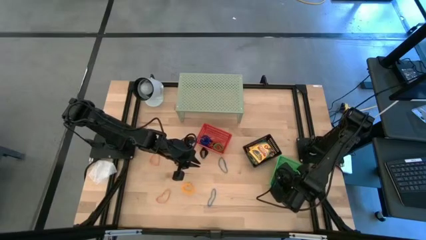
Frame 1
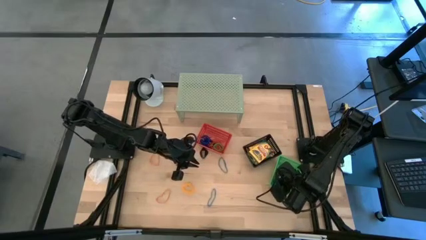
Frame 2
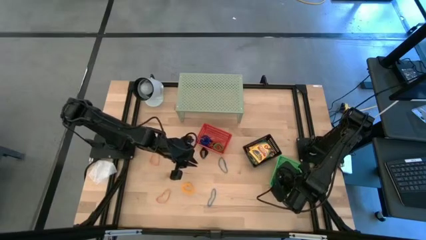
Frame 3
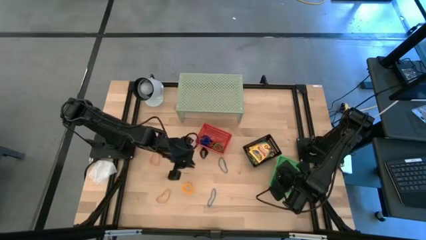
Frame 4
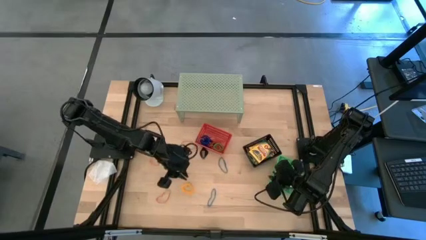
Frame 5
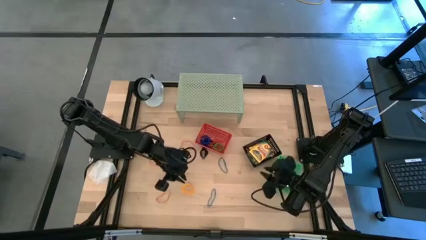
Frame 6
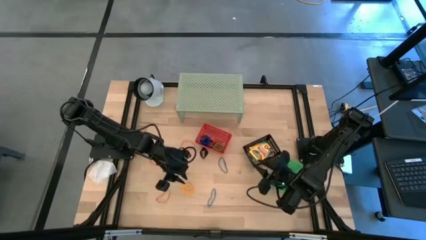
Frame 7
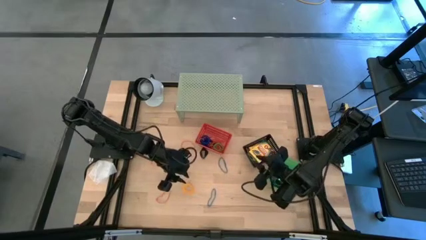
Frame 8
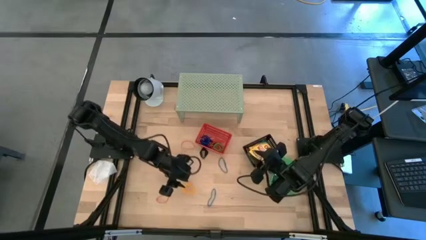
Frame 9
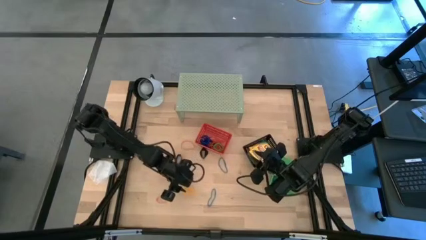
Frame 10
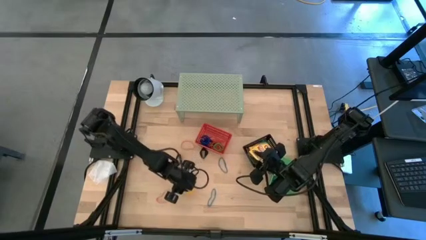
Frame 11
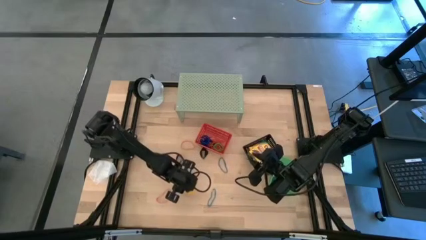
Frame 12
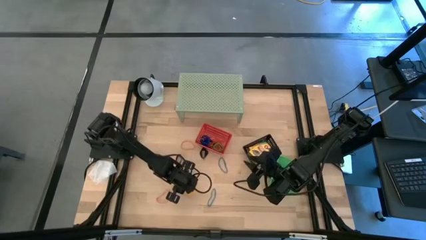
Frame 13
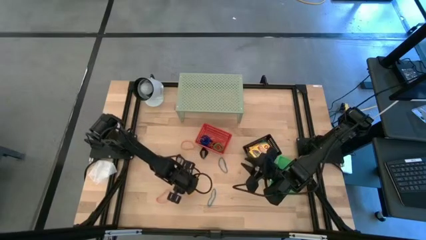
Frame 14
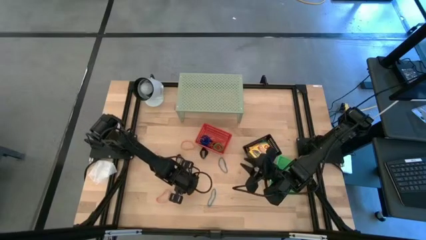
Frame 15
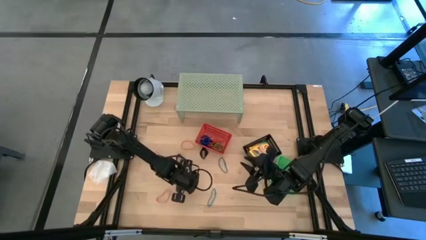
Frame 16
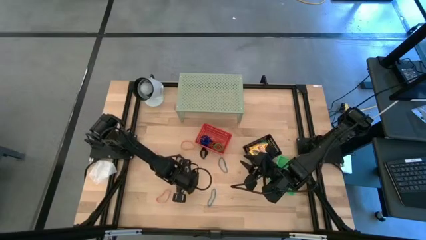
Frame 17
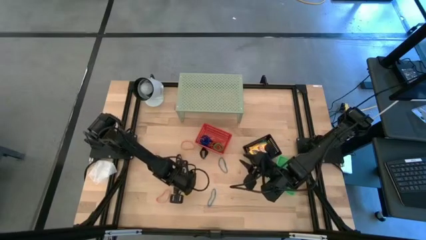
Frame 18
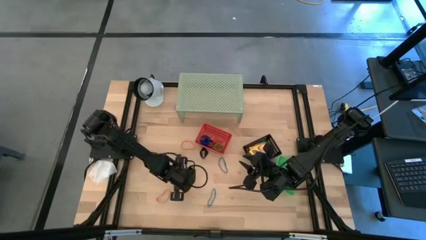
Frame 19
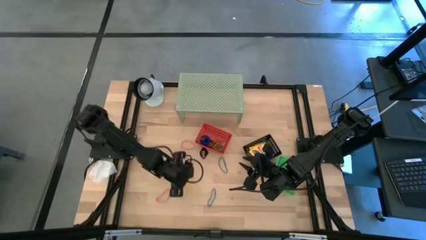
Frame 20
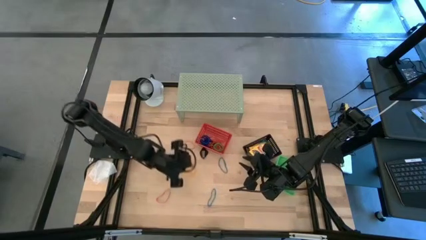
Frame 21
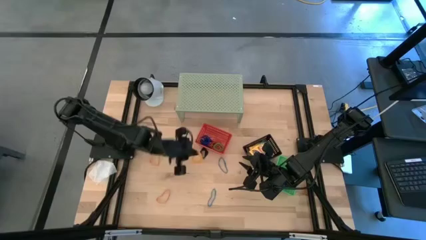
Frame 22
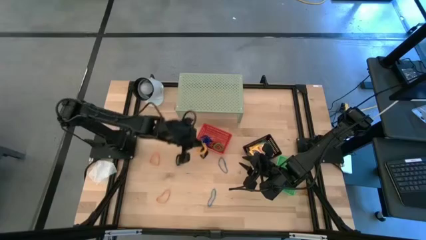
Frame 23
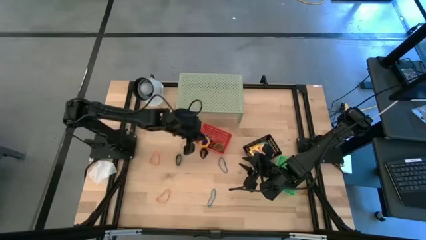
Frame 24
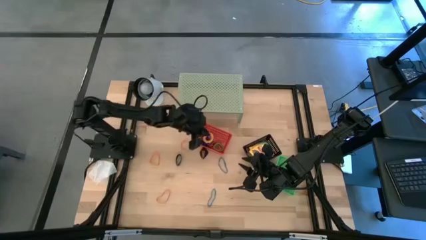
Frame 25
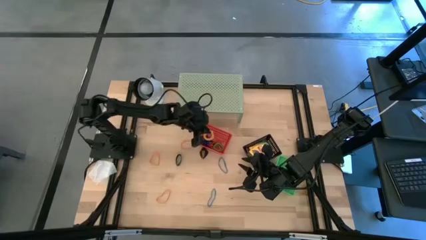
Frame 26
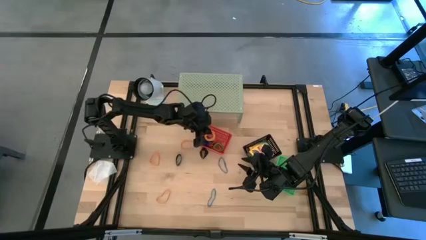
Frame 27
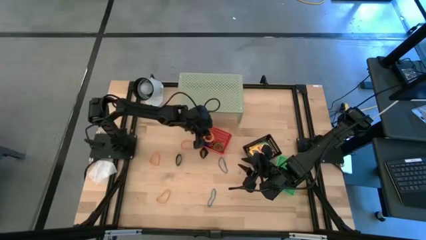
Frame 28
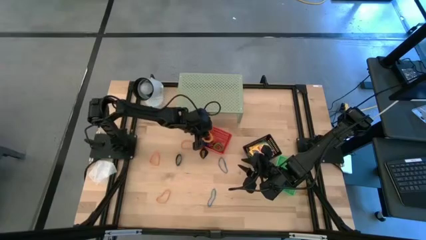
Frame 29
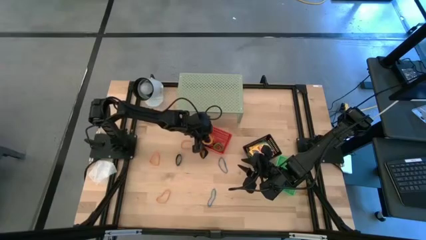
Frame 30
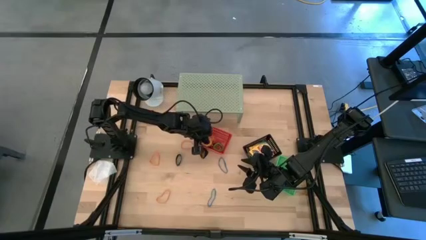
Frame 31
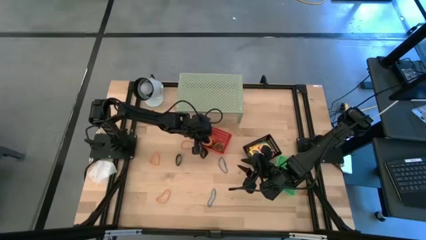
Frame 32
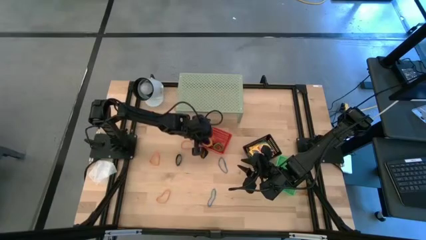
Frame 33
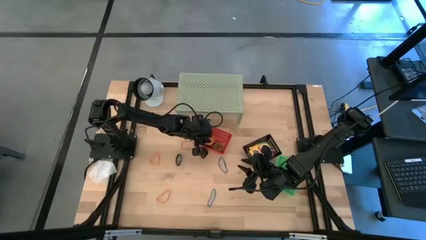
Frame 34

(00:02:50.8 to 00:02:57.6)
Task: Pick & Place Office Desk Supplies
Put the yellow spring keychain into the red bin

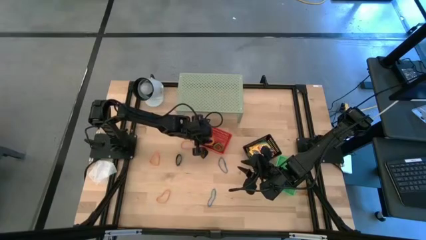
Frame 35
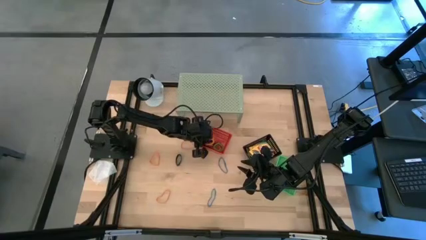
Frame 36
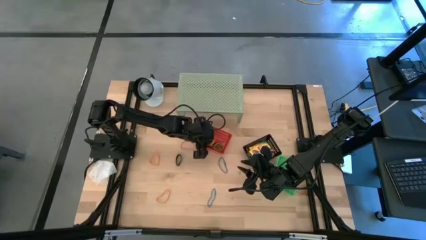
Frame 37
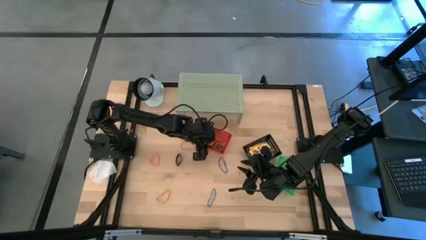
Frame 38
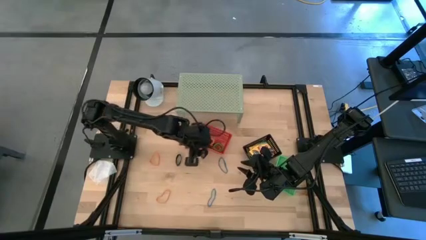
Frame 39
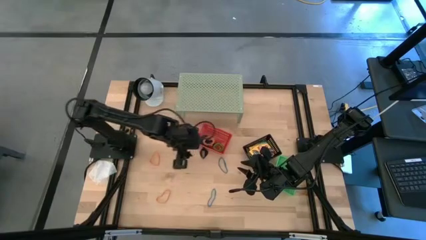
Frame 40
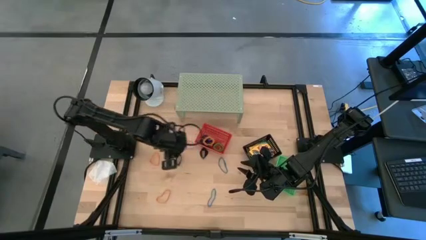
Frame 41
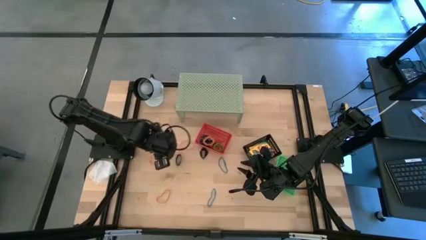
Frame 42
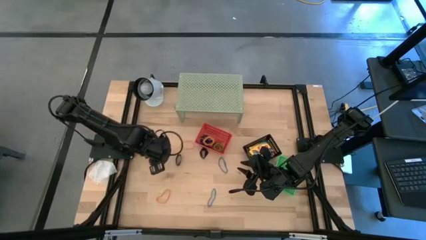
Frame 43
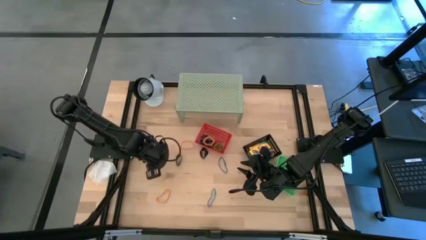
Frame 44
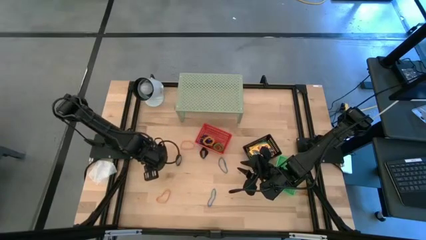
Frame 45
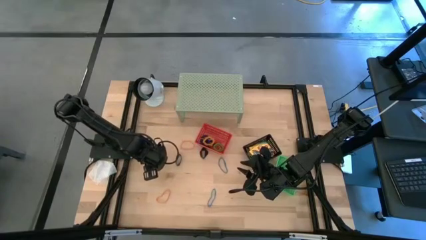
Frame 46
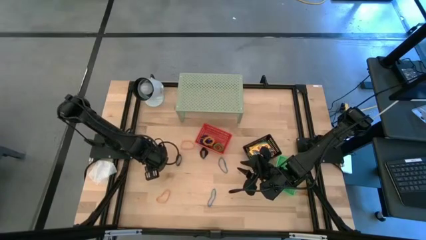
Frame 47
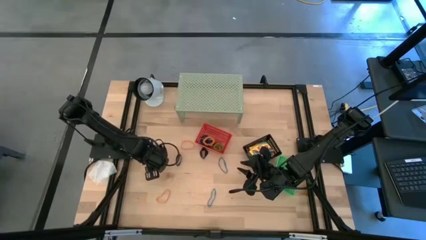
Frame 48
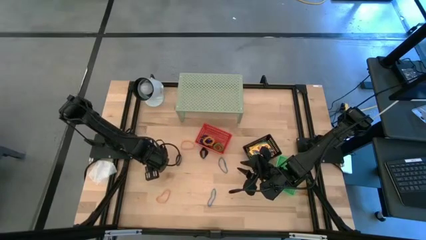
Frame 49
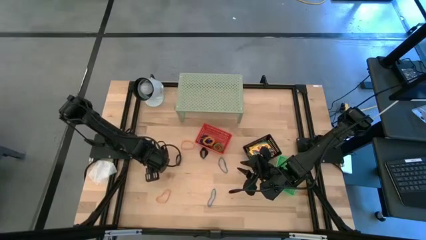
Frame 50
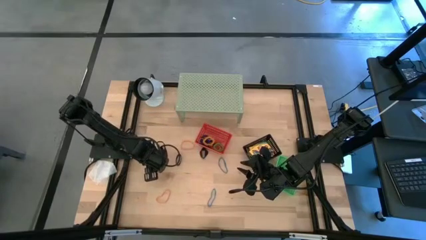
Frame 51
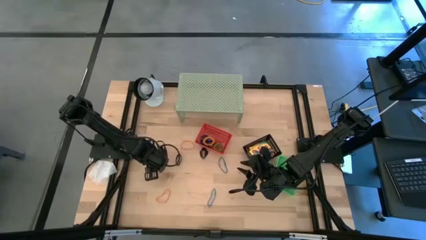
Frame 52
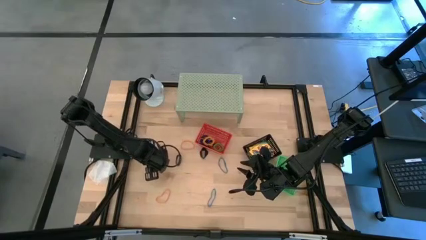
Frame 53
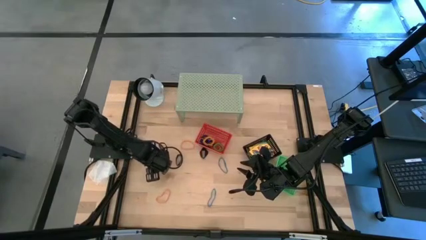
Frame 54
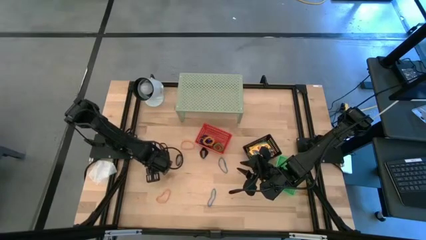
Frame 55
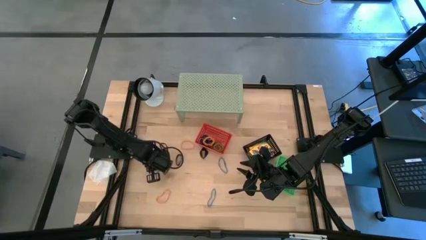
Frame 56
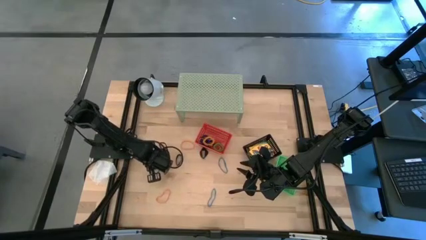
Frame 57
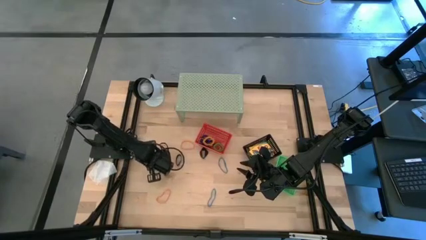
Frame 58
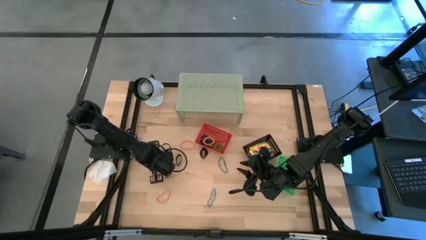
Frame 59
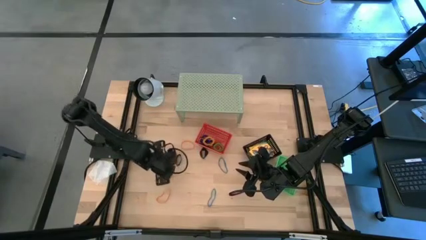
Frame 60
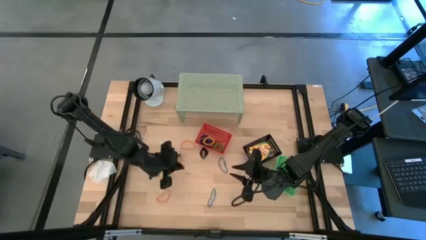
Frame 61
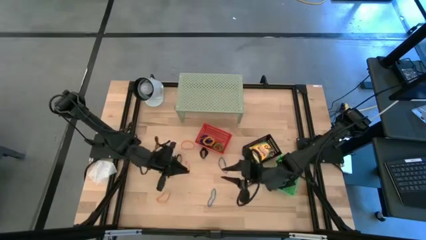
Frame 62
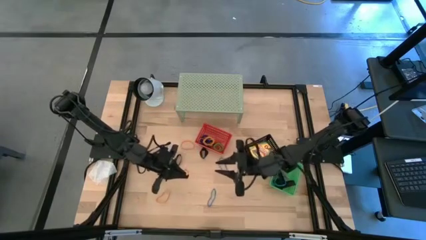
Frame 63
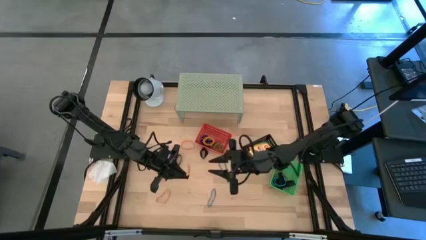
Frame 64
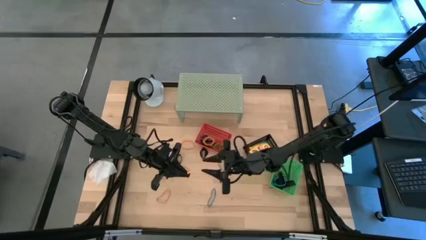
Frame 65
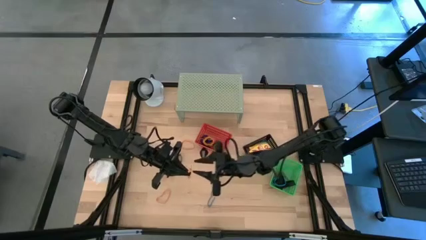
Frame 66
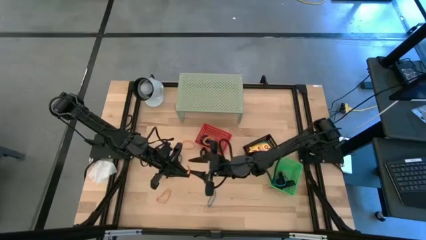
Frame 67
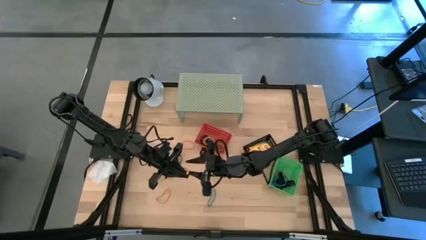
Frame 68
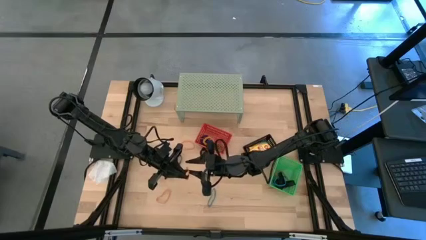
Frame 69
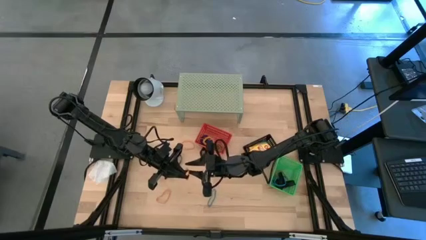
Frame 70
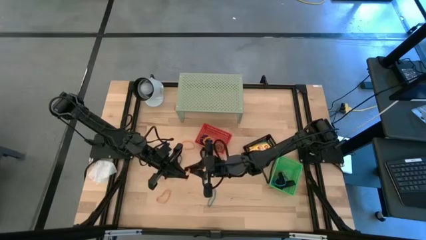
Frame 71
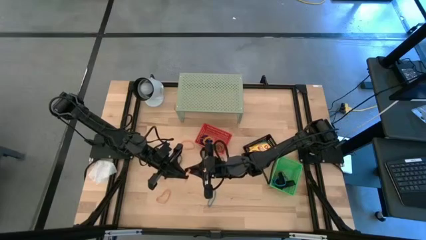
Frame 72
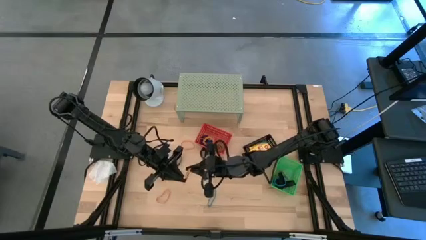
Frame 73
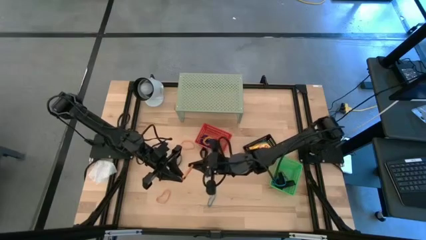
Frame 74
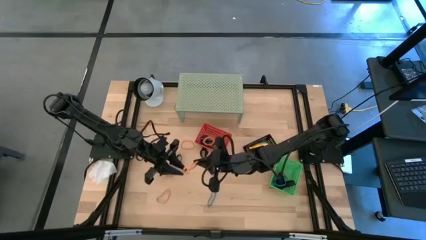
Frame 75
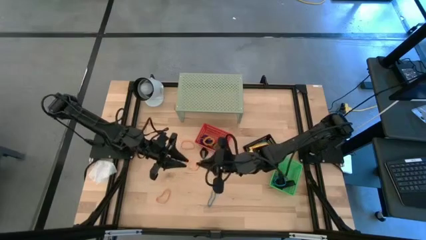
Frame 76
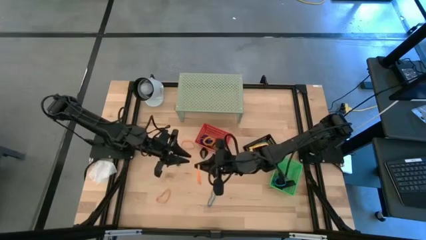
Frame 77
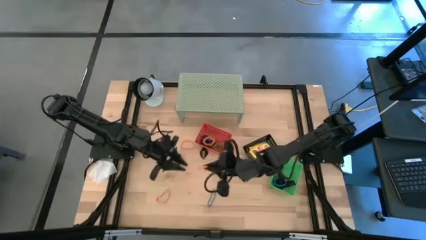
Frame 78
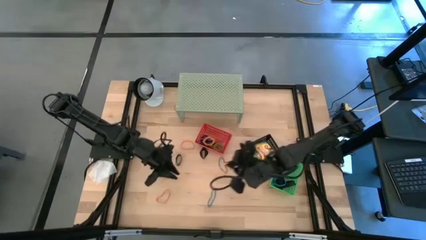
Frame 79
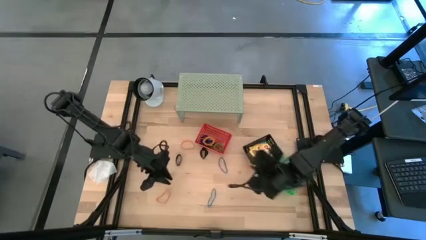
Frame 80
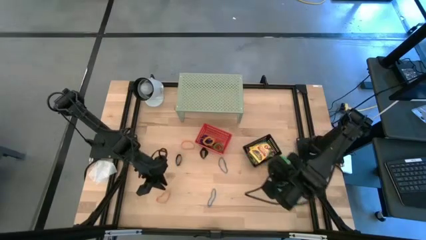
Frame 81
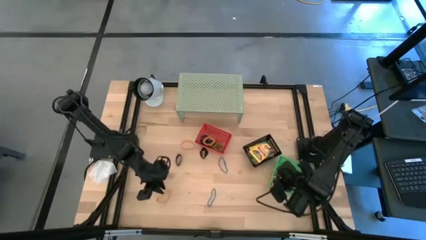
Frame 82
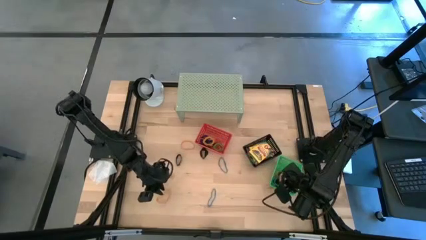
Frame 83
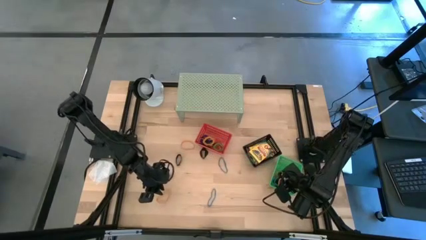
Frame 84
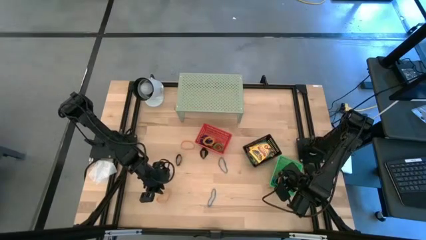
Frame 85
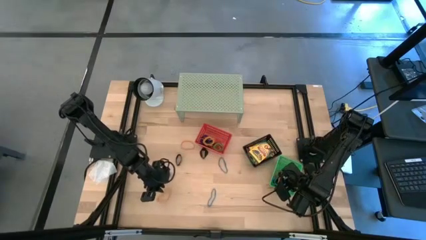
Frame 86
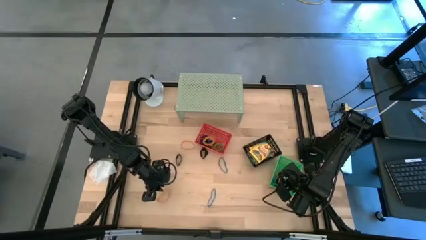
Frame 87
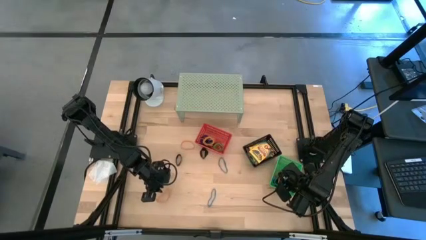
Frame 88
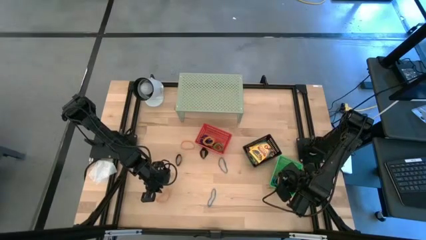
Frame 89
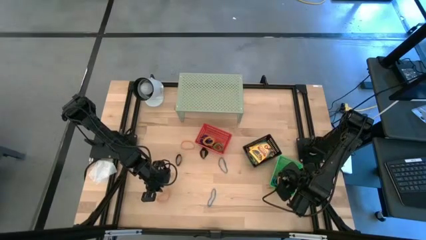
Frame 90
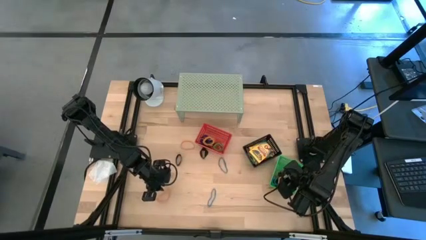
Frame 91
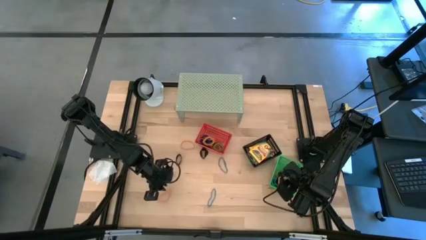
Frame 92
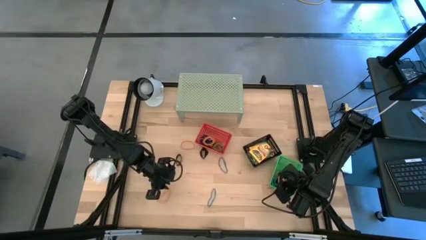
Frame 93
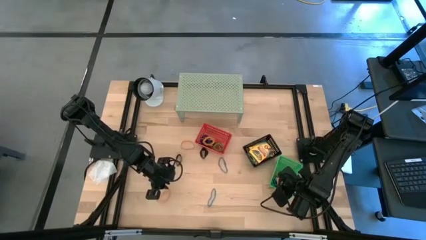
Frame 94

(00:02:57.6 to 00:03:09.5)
Put the orange rubber band into the green bin
